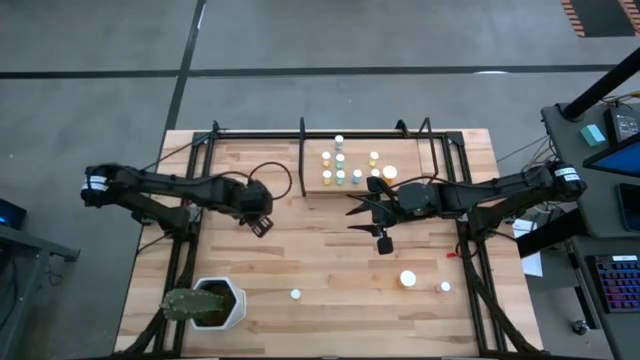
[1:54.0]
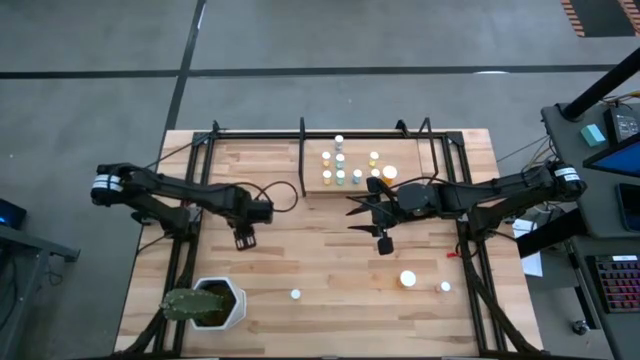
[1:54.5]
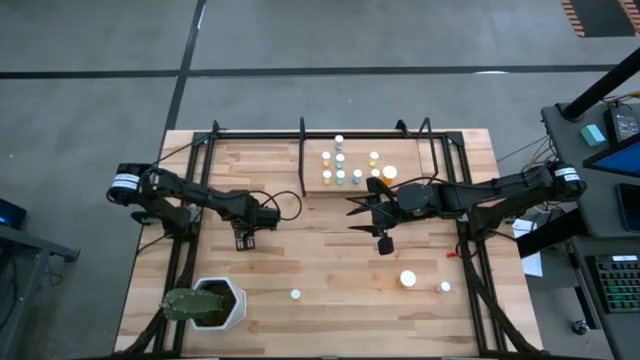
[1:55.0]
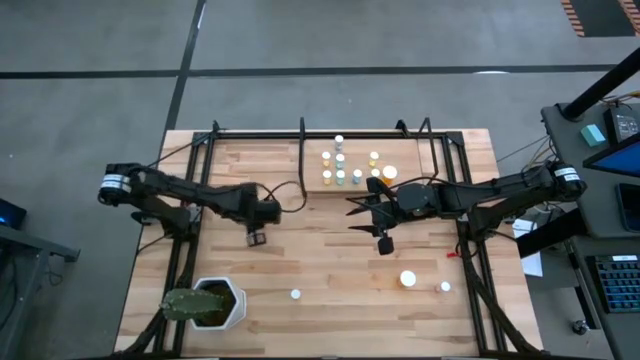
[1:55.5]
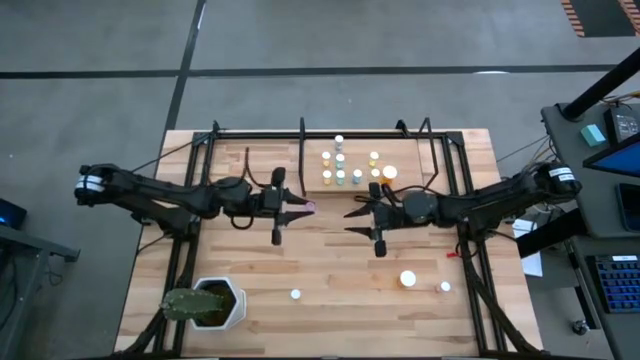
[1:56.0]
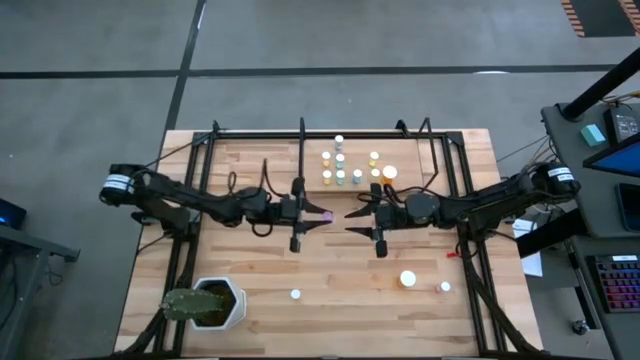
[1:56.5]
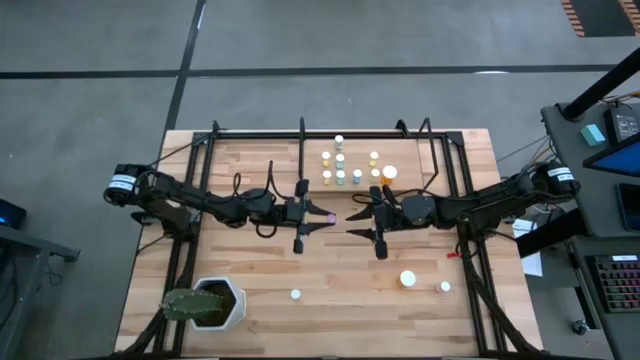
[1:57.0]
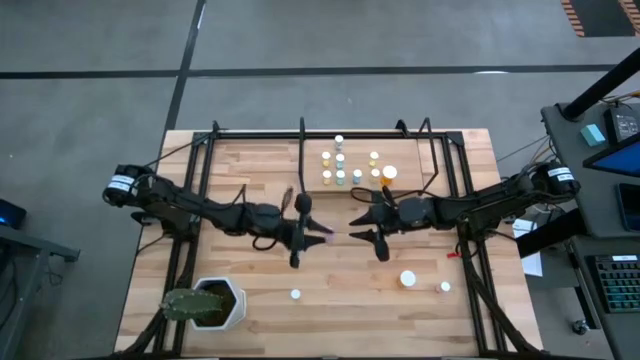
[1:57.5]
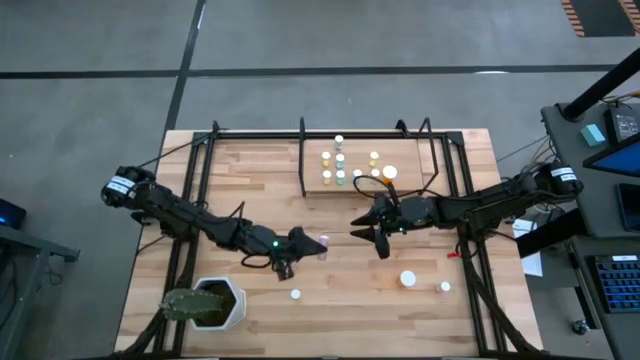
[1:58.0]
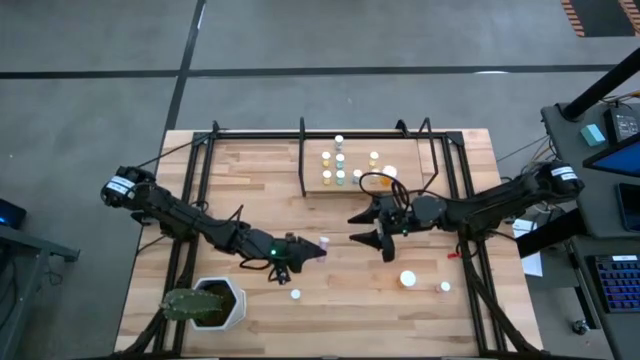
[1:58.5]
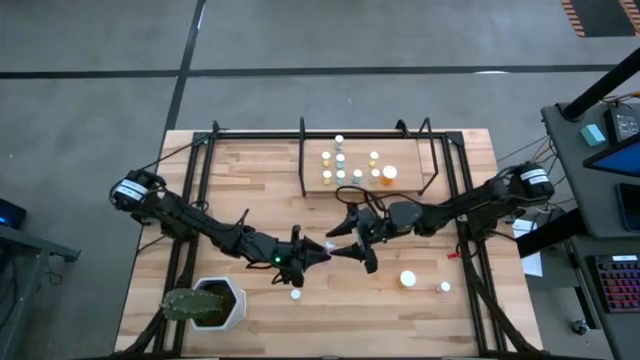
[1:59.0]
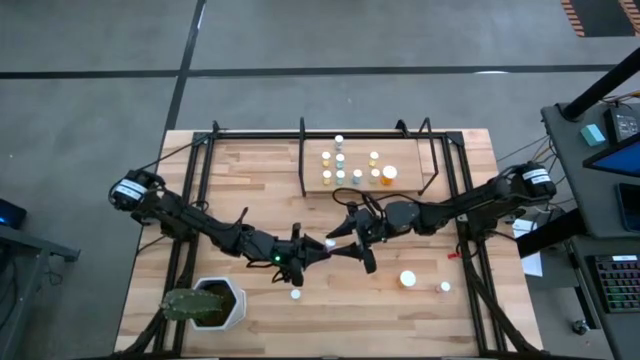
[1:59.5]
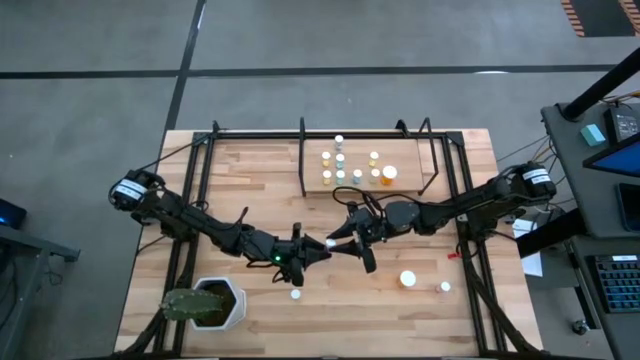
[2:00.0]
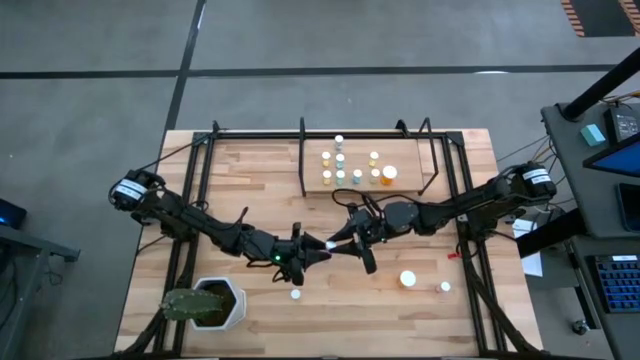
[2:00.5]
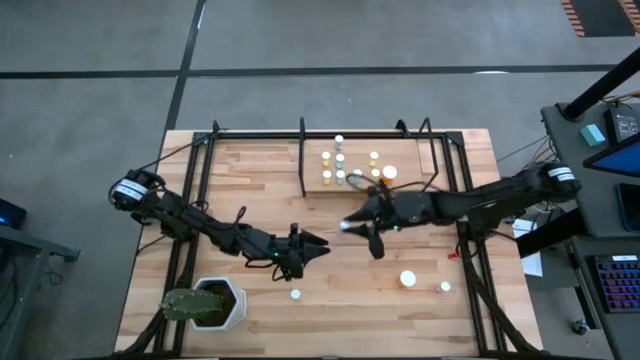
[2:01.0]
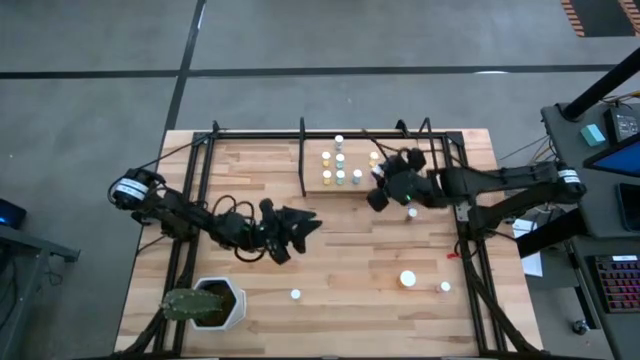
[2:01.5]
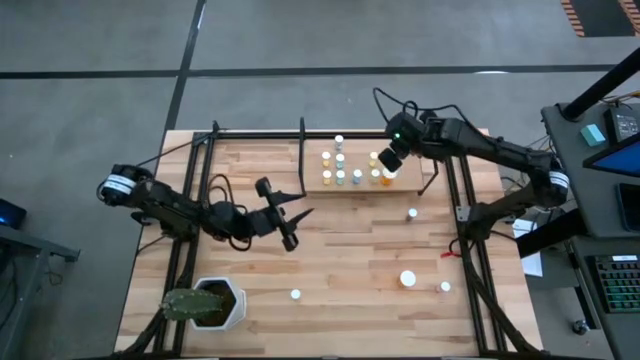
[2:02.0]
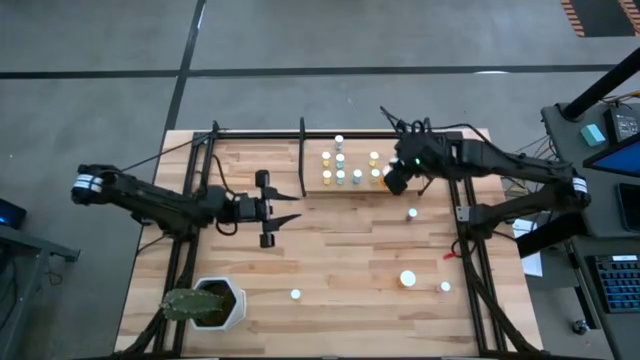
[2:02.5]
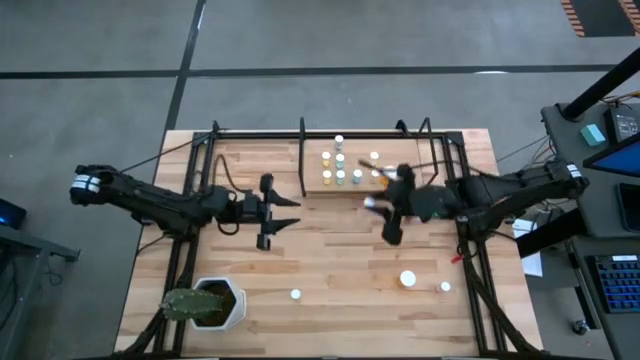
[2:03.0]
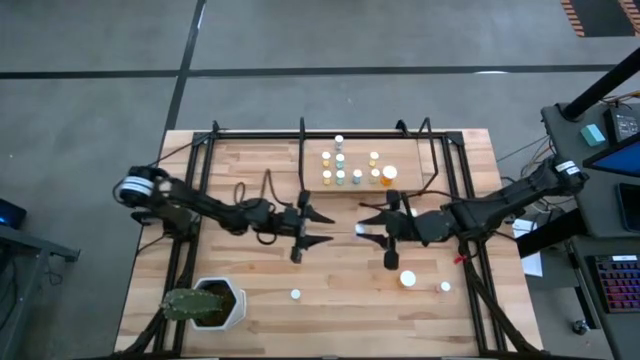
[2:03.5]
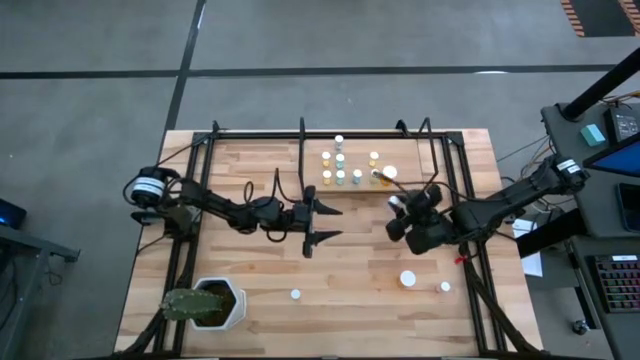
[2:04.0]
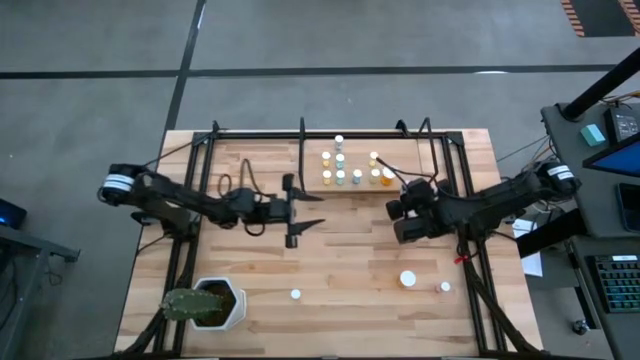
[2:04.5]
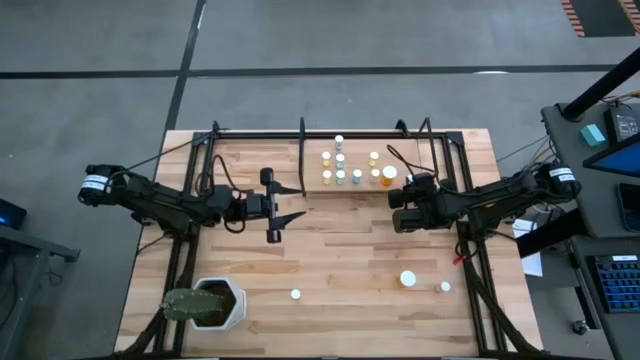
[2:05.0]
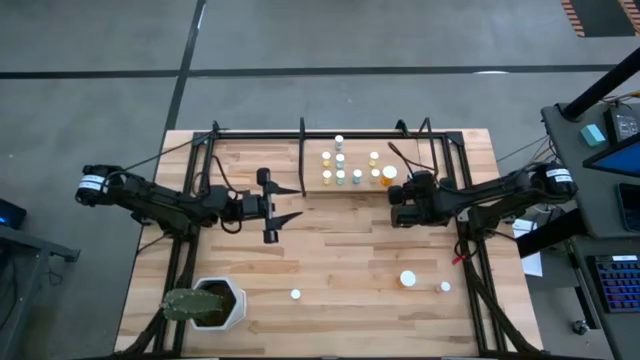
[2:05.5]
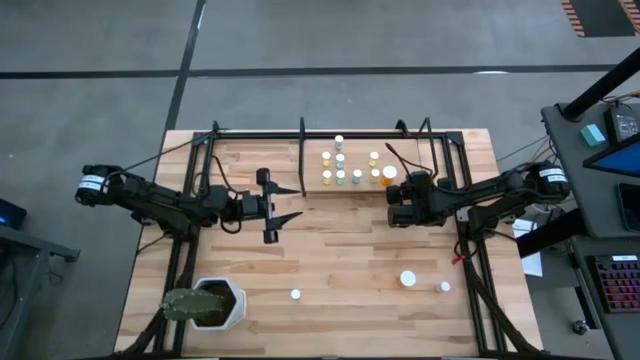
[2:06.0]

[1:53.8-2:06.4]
Task: Pick and place medicine bottles onto shelf by color
Put the pink pill bottle on the shelf

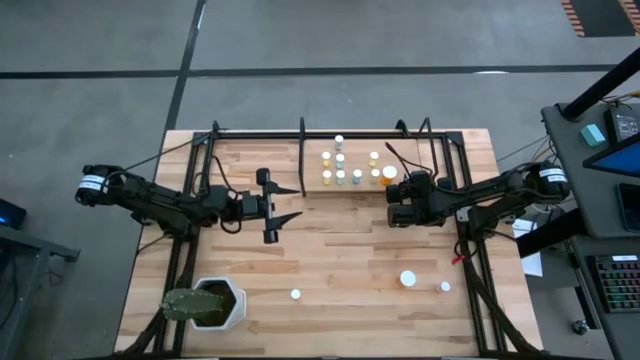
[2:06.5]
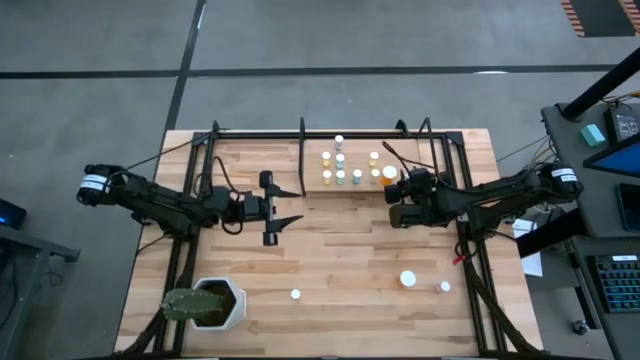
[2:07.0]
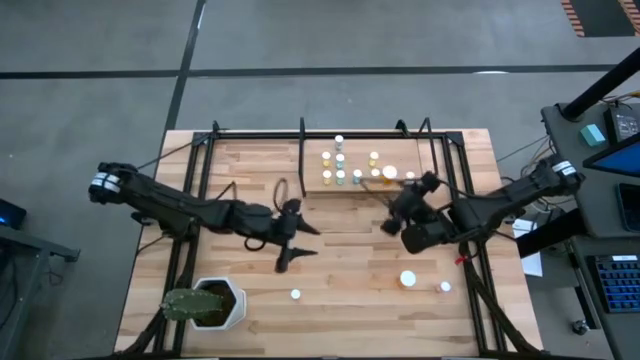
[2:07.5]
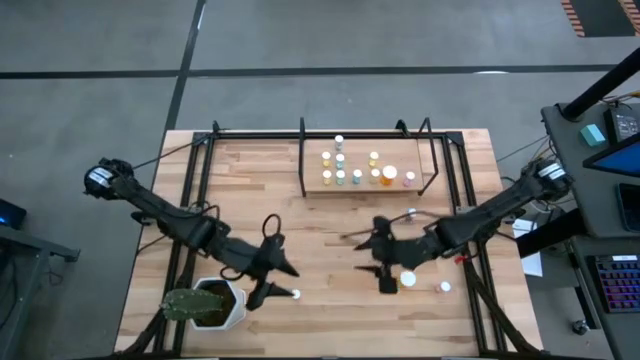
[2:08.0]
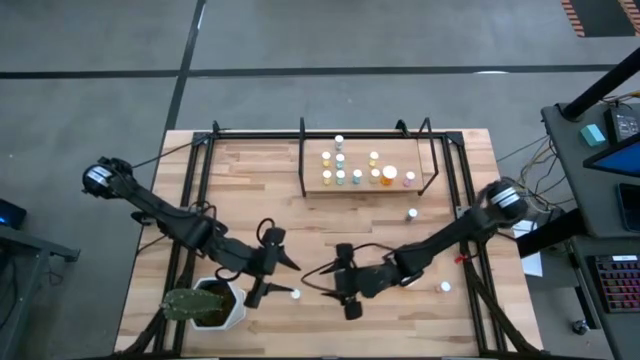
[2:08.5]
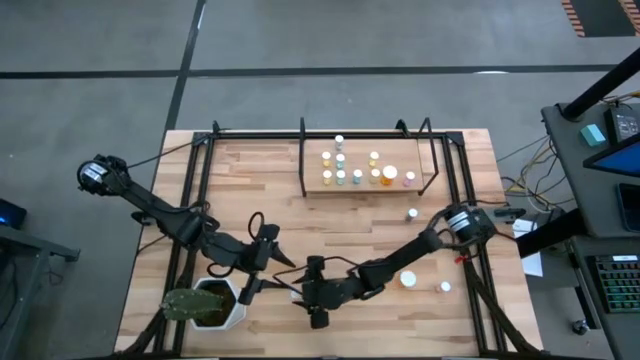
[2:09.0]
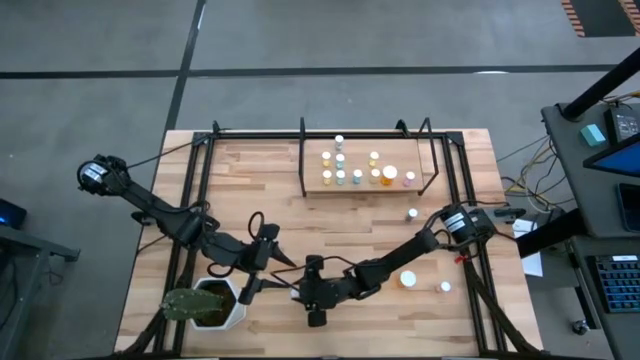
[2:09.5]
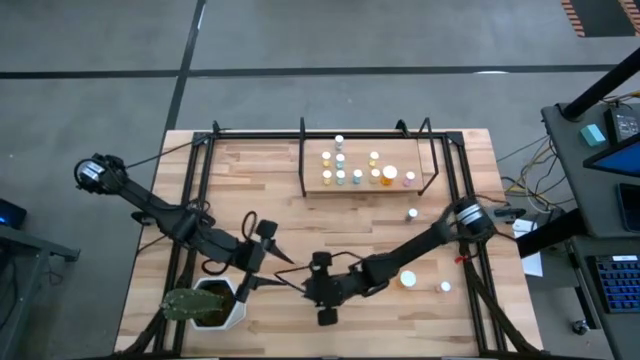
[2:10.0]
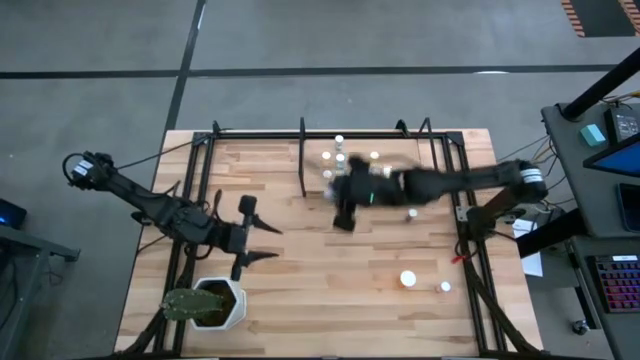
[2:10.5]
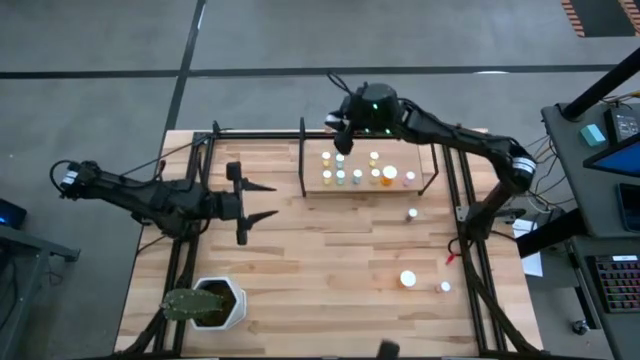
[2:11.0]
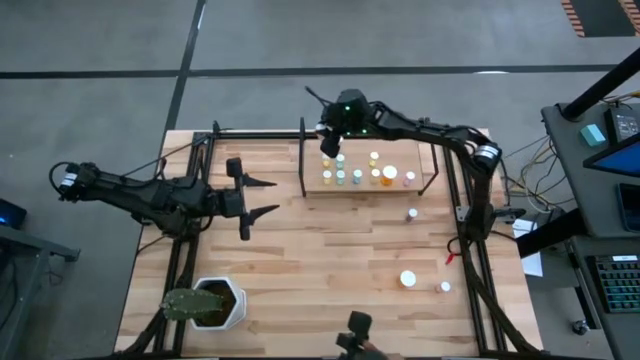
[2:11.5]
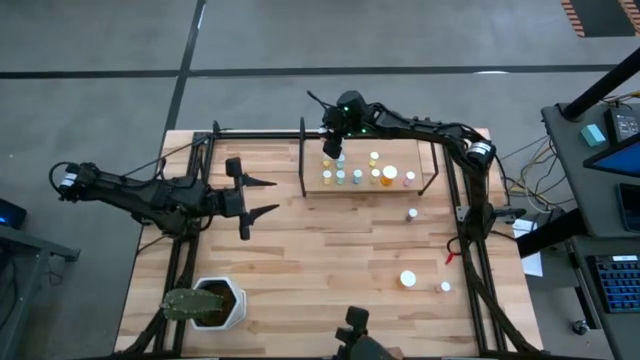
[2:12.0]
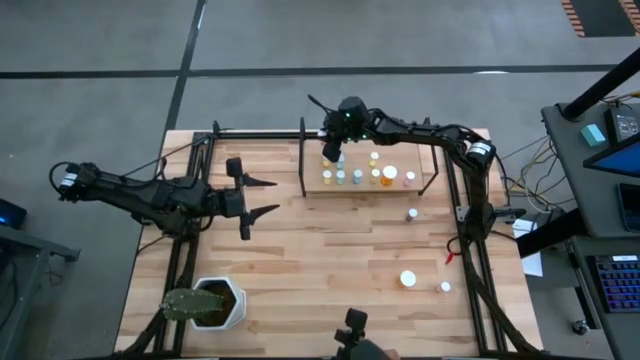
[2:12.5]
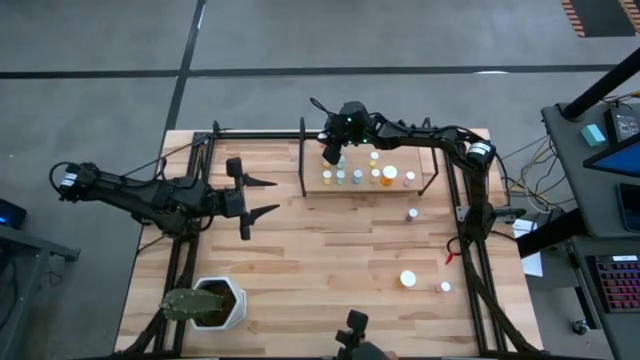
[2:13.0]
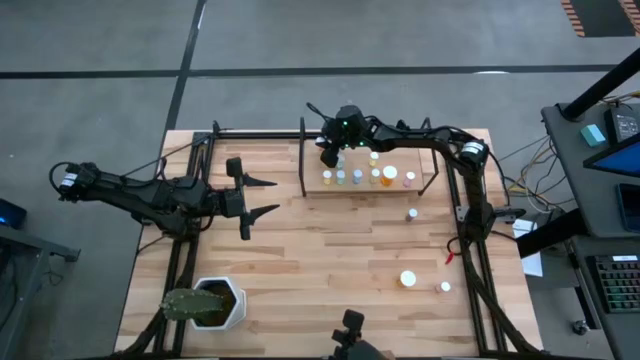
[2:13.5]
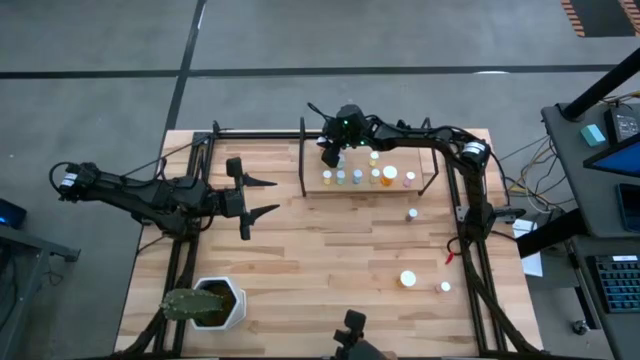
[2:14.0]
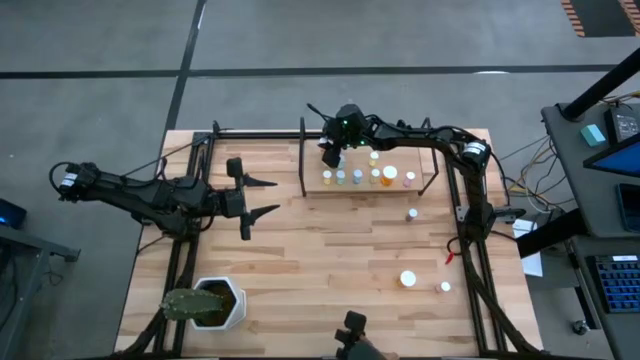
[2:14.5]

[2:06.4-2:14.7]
Put the yellow pill bottle on the shelf aligned with the other yellow pill bottles

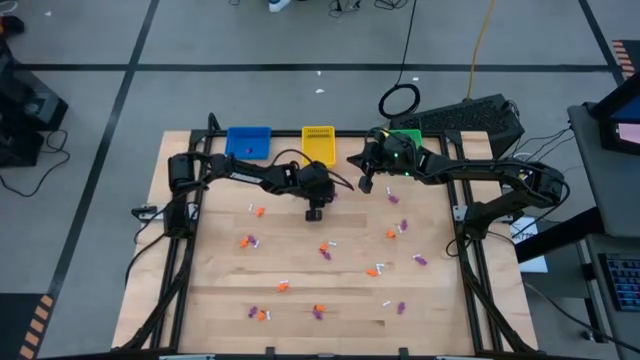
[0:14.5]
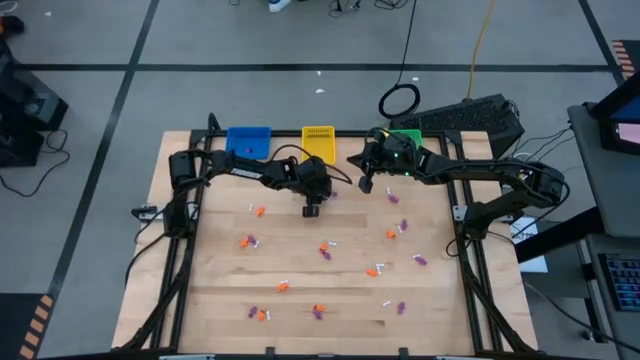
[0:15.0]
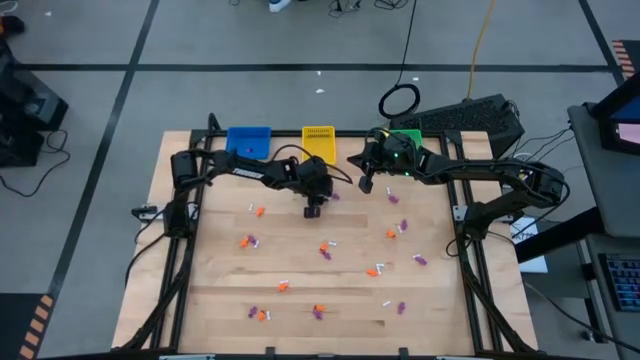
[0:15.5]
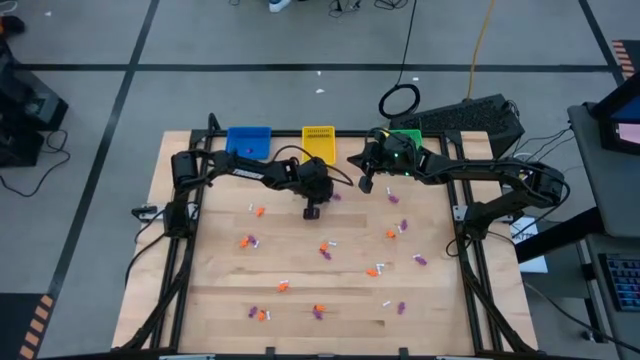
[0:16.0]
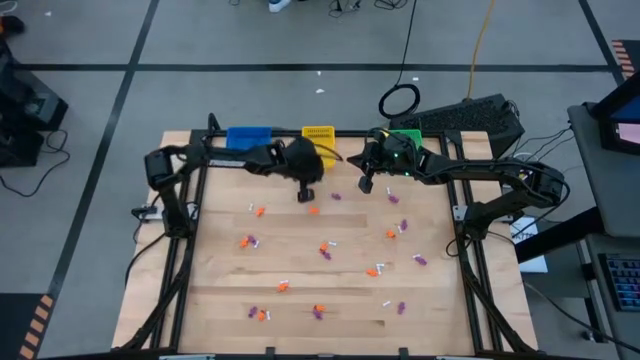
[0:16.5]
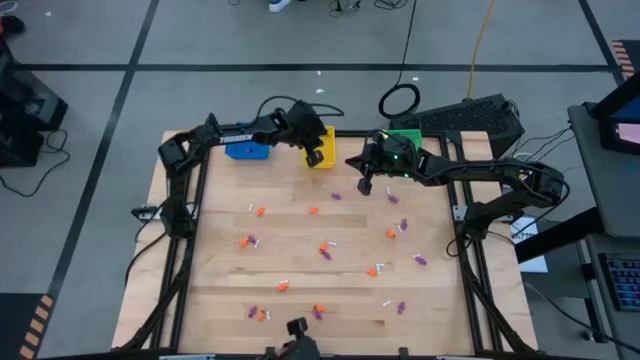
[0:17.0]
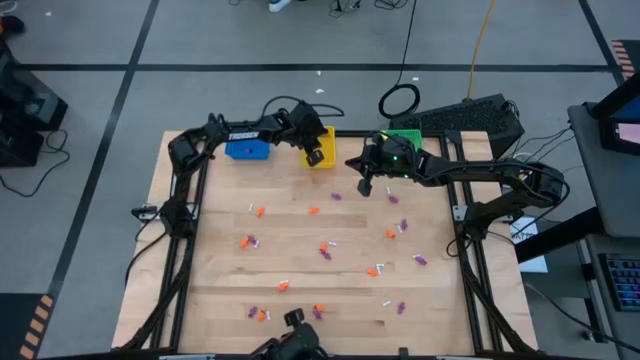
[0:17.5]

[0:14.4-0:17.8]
Task: Sort Halloween decoration
Put the white bone toy into the yellow bin
